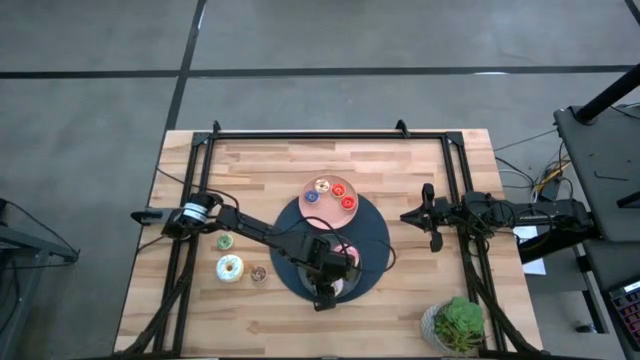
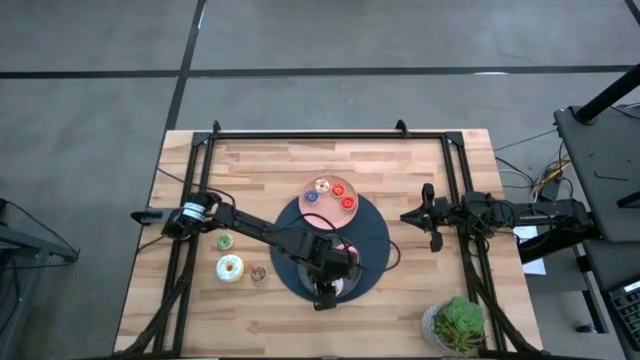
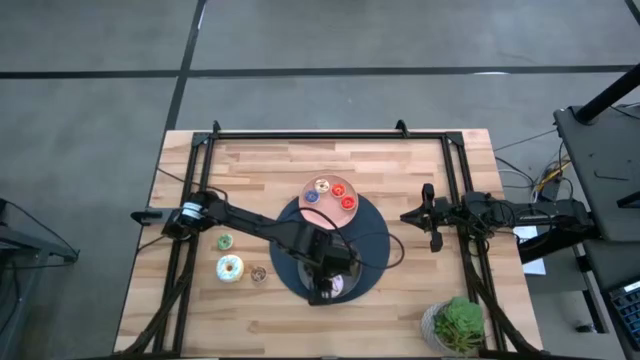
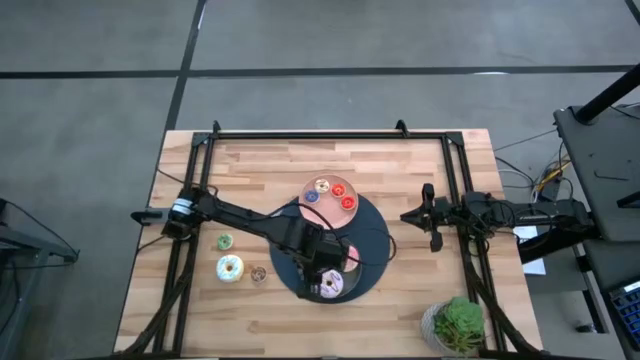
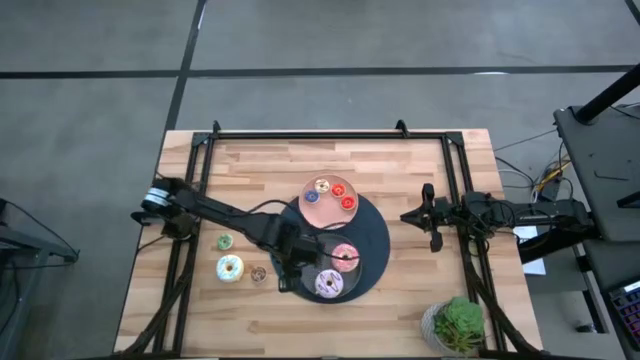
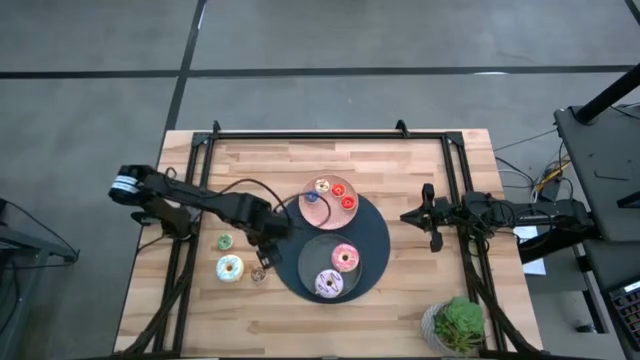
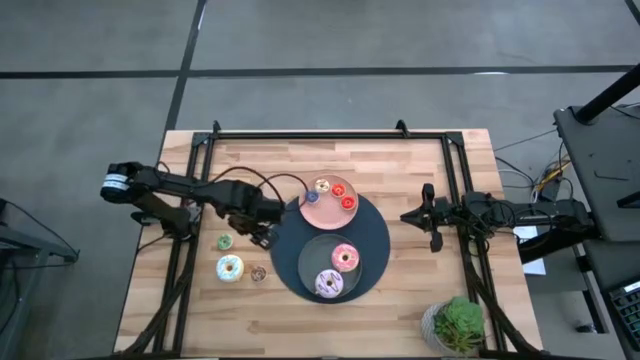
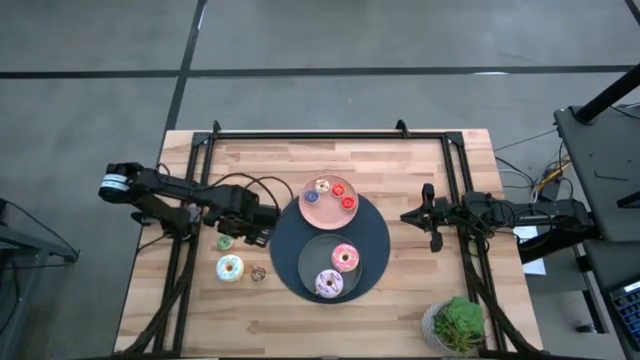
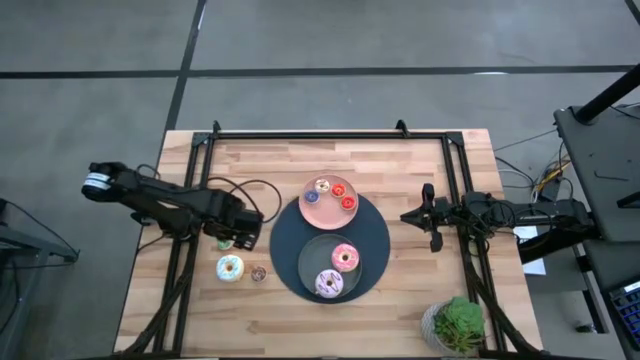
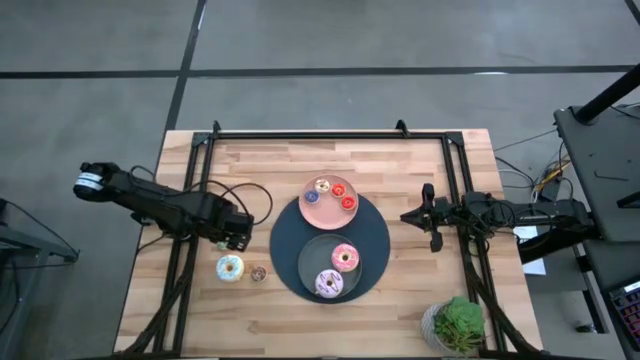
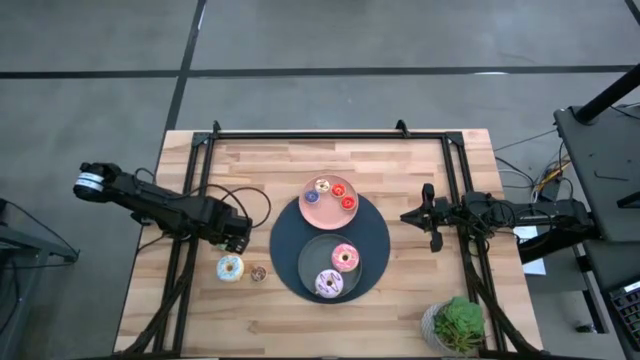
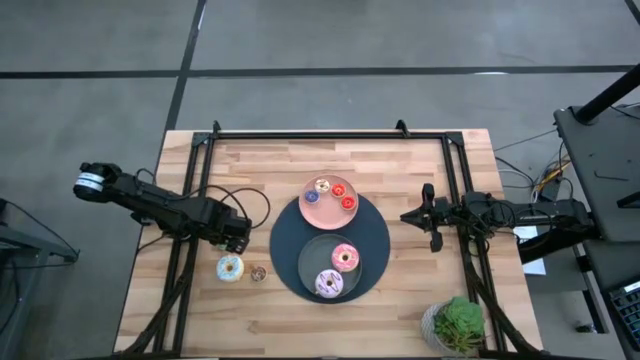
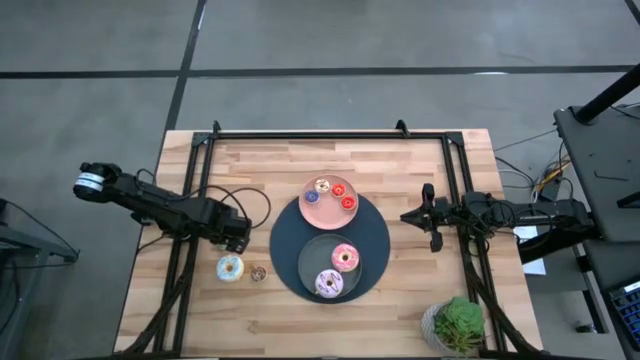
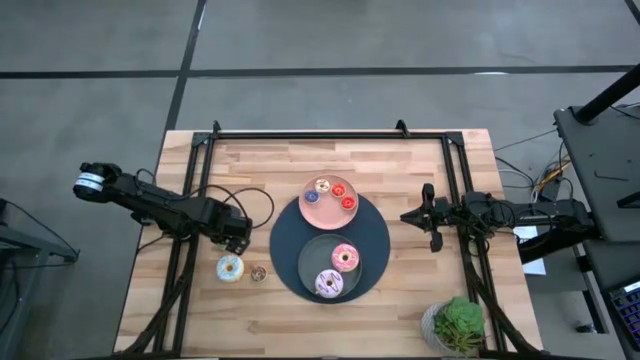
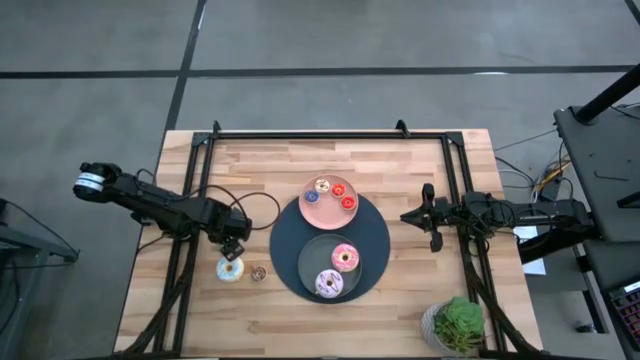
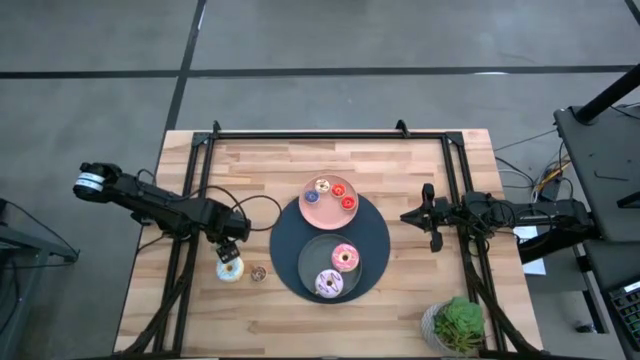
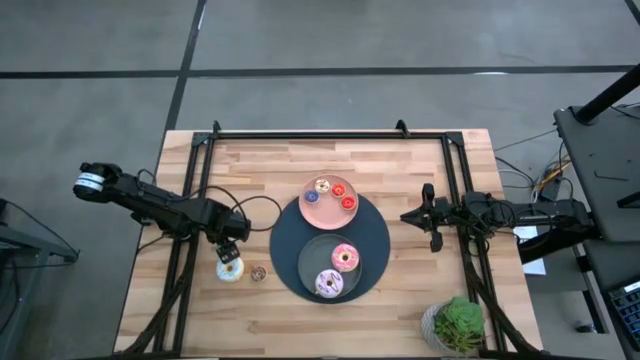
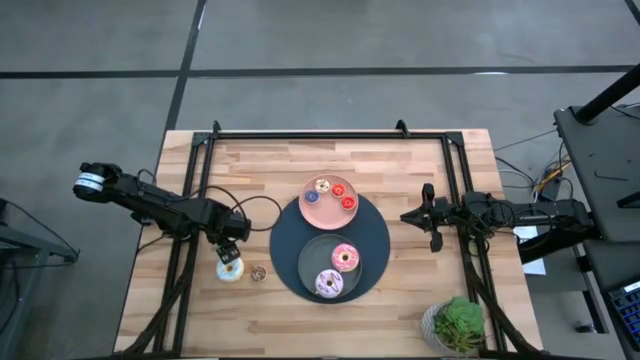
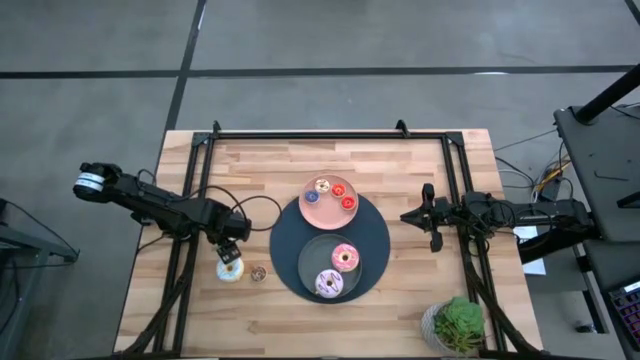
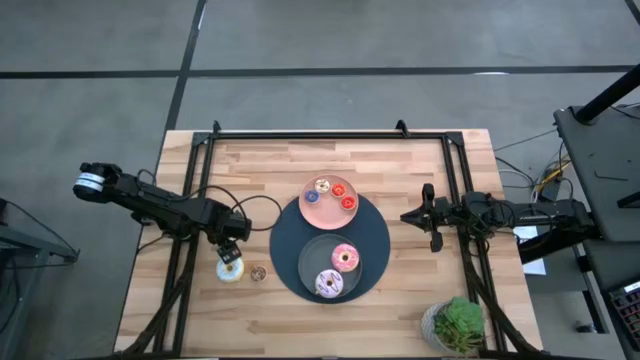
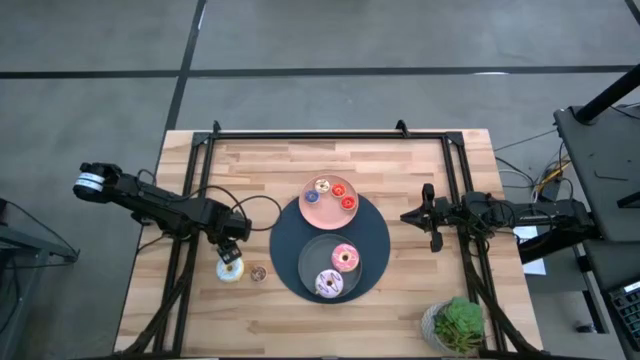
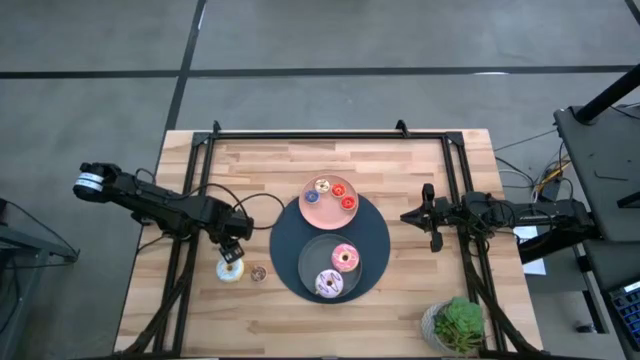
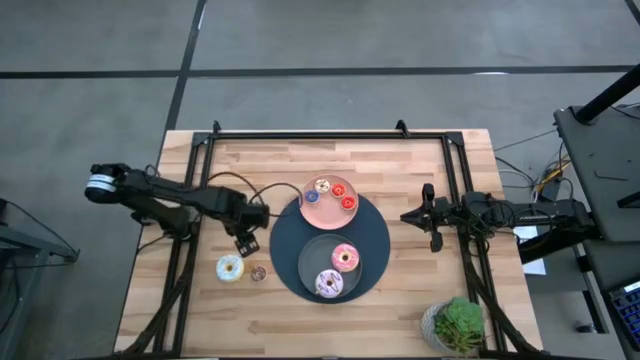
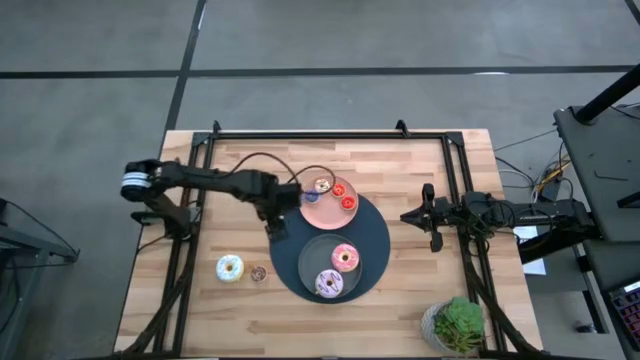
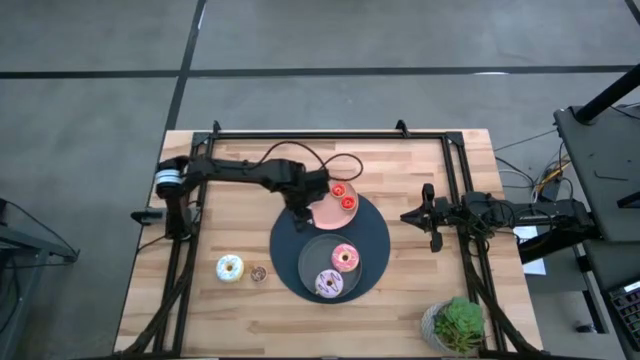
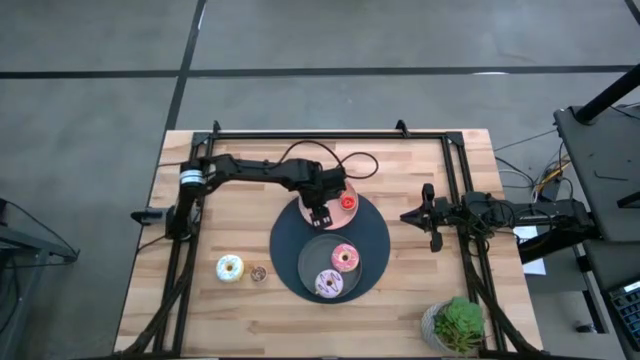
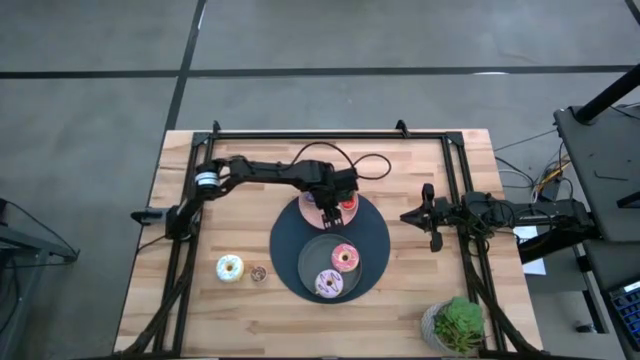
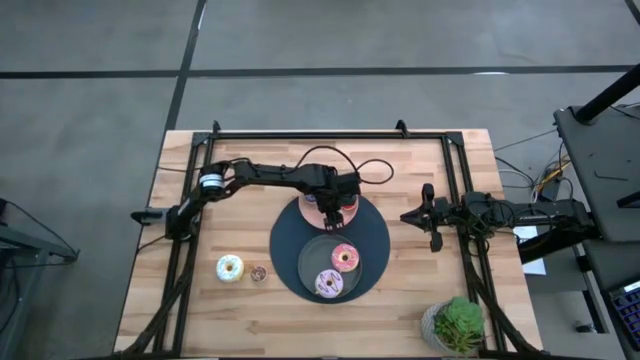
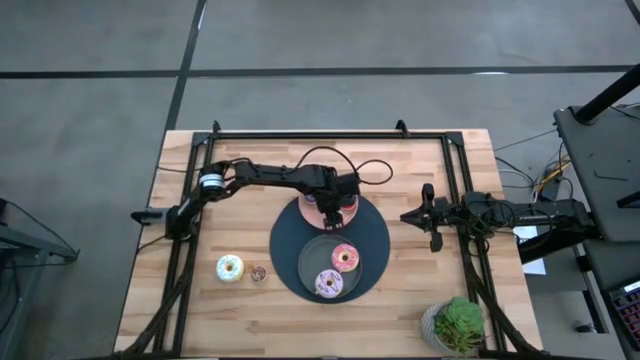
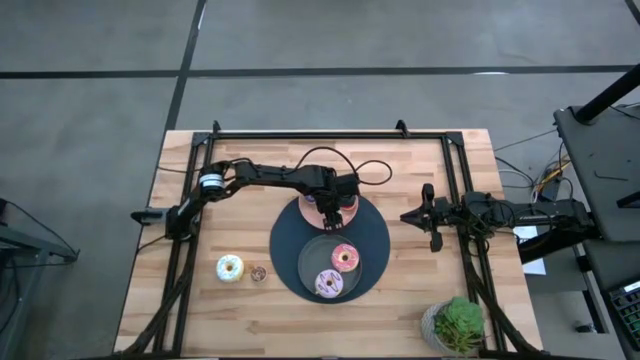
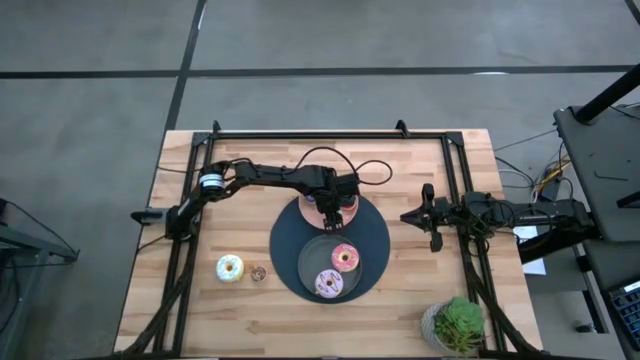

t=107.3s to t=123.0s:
Task: Pick & Place donuts
Put the small green donut on the pink plate
